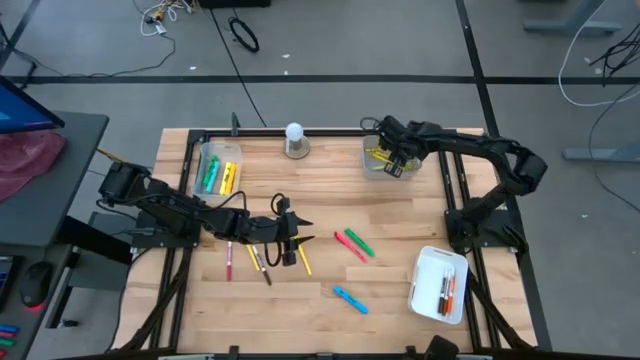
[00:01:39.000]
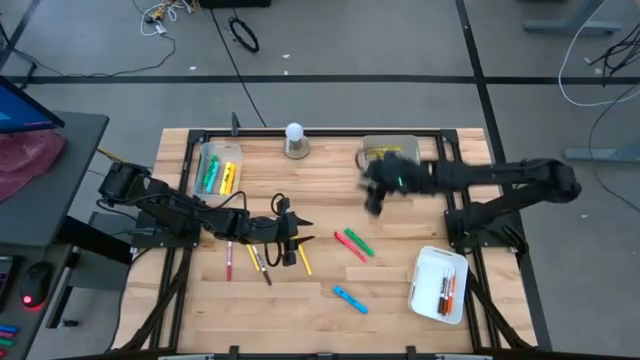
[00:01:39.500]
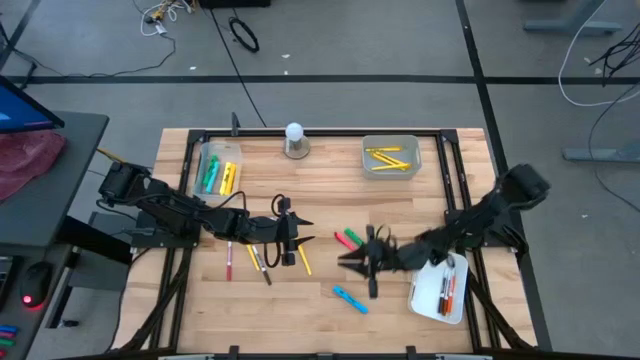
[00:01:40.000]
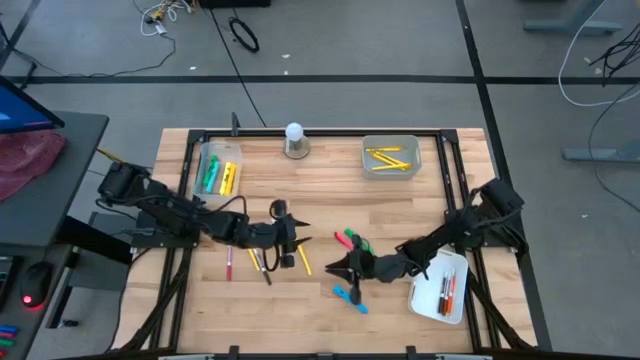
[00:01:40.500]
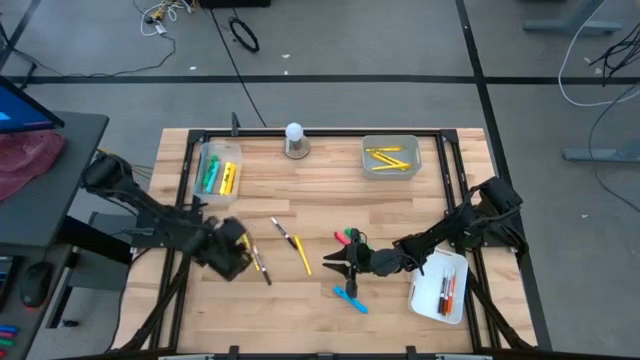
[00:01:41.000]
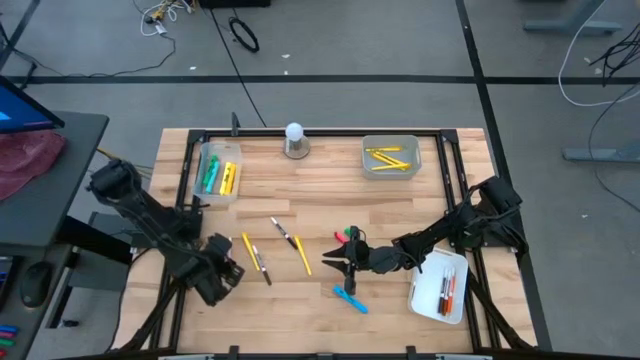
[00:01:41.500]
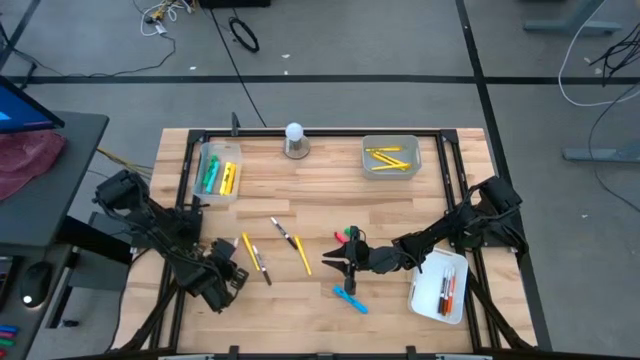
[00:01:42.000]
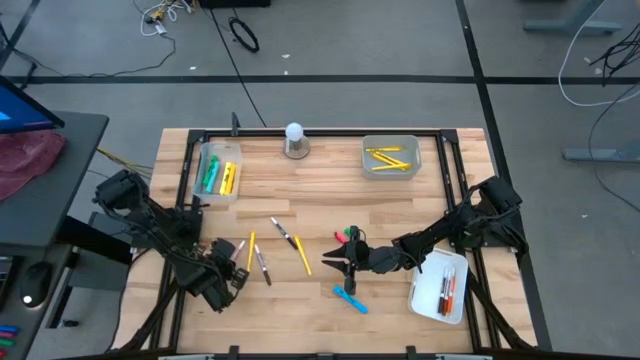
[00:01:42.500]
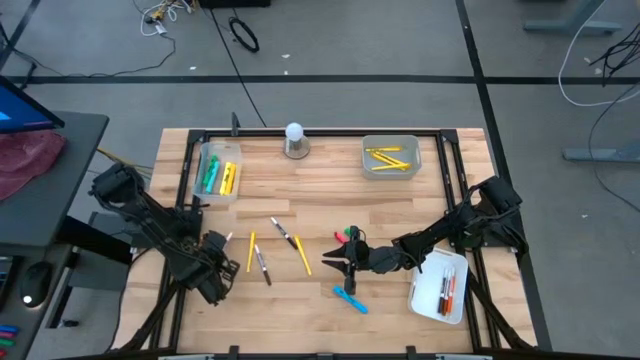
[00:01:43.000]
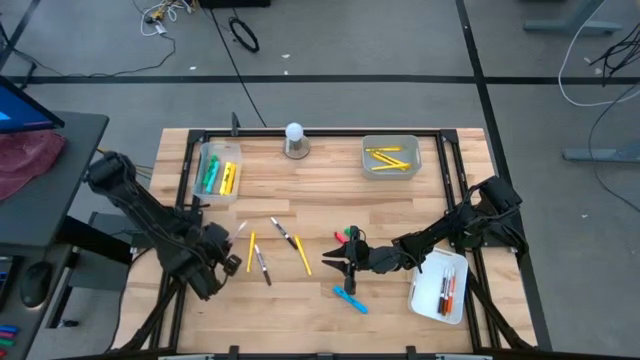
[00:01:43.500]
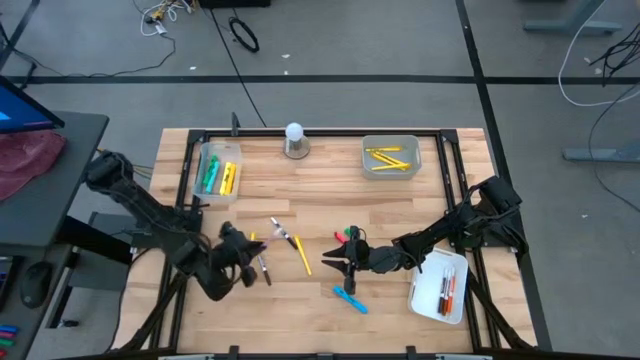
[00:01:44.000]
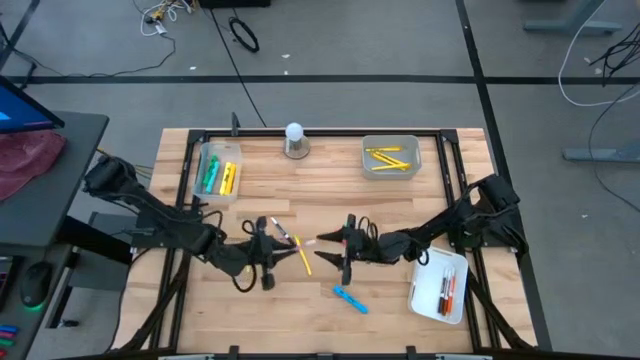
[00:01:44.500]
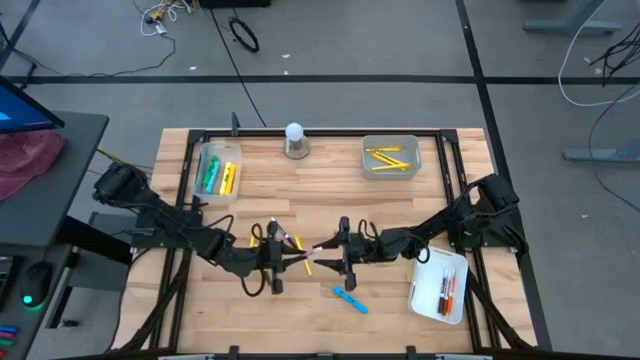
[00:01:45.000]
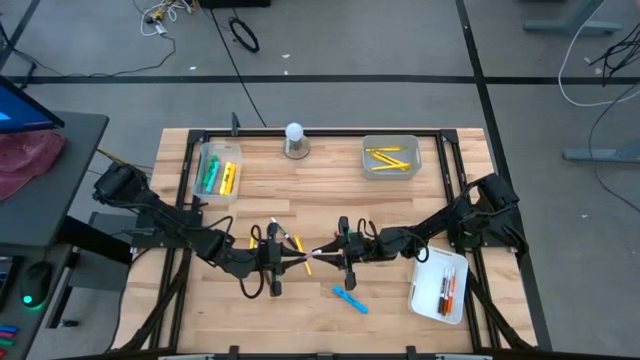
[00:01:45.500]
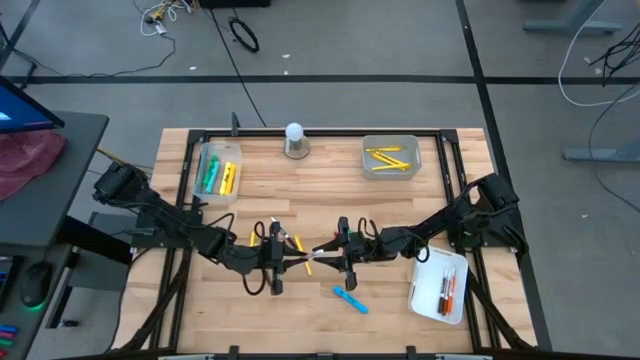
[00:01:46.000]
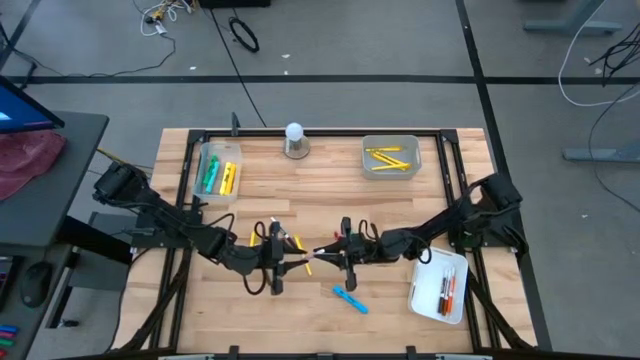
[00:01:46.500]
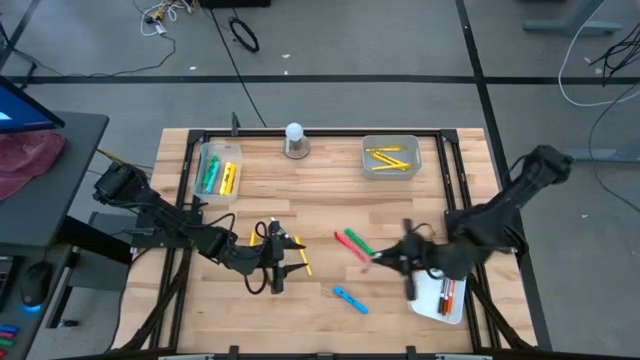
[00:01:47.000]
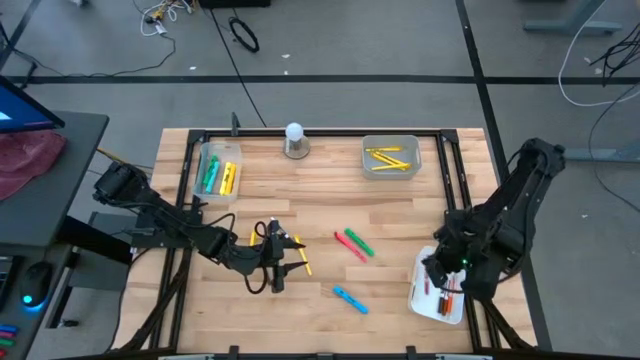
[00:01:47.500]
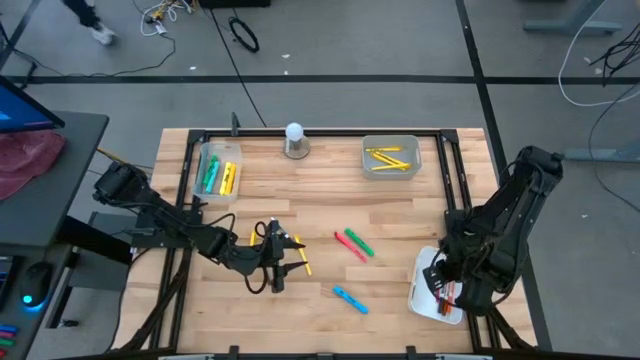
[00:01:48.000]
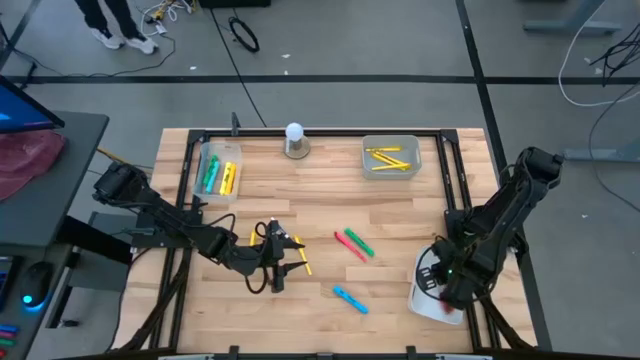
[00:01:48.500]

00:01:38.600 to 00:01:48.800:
Task: Pick & Place Markers
Put the pink marker into the white bin

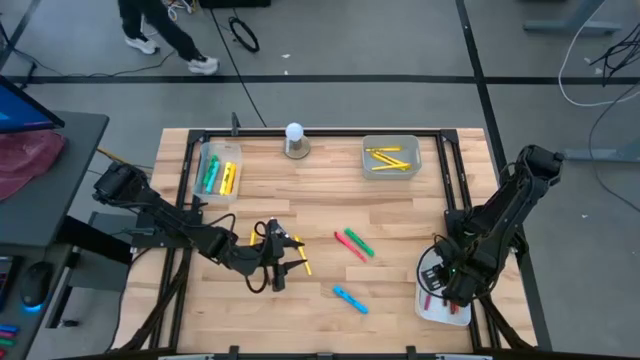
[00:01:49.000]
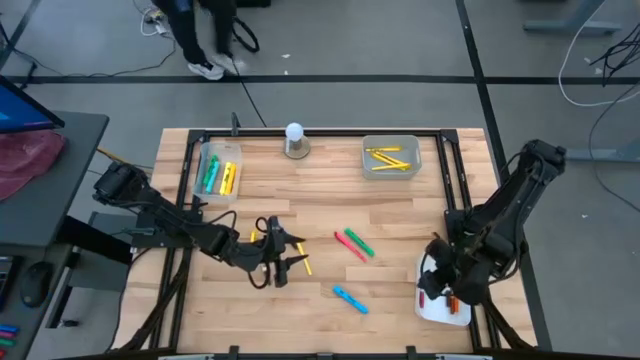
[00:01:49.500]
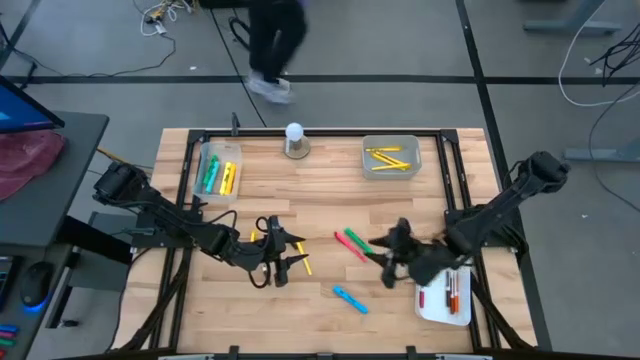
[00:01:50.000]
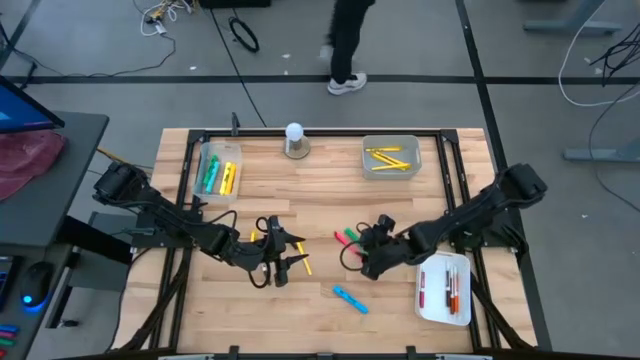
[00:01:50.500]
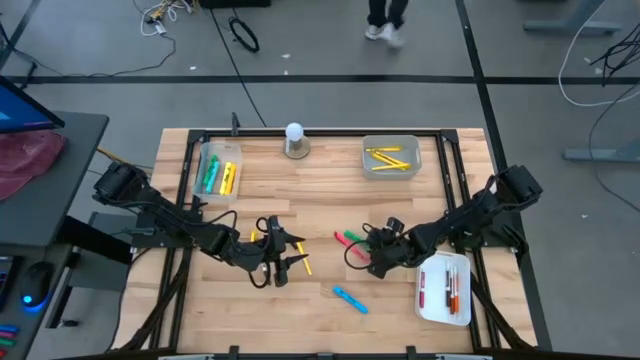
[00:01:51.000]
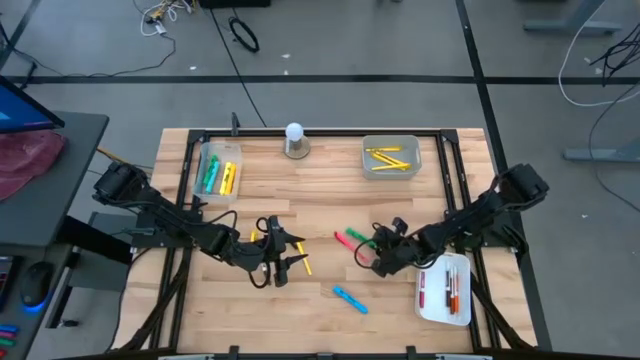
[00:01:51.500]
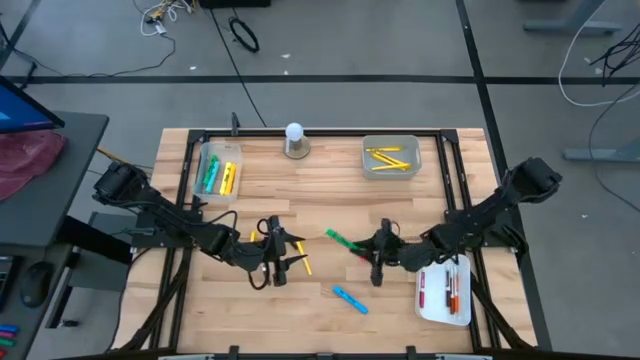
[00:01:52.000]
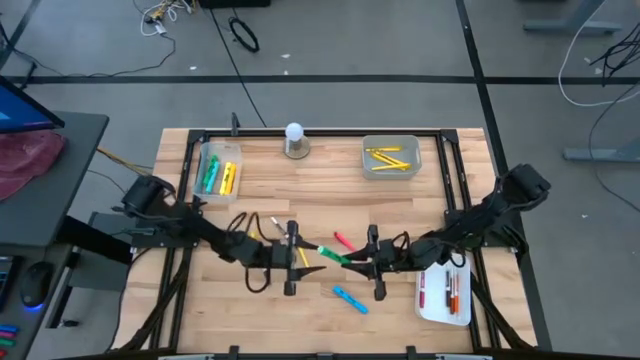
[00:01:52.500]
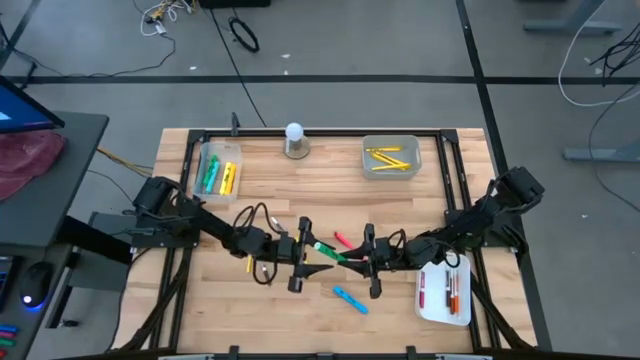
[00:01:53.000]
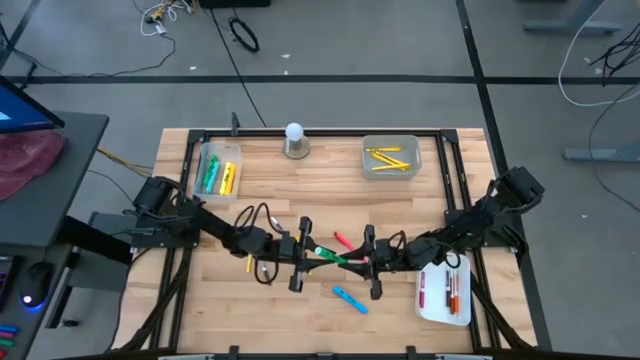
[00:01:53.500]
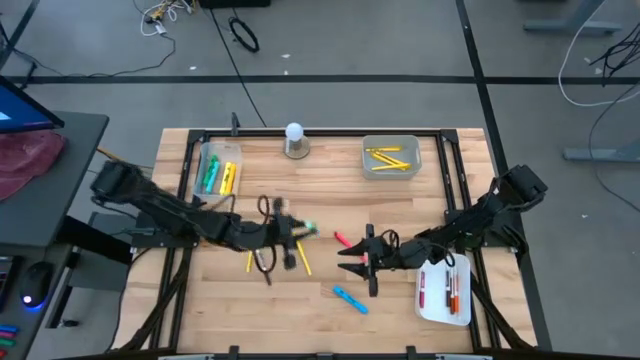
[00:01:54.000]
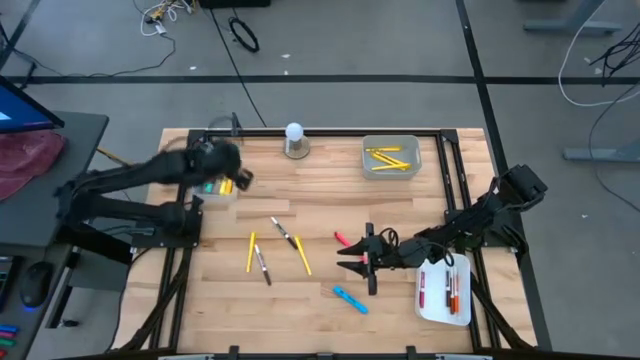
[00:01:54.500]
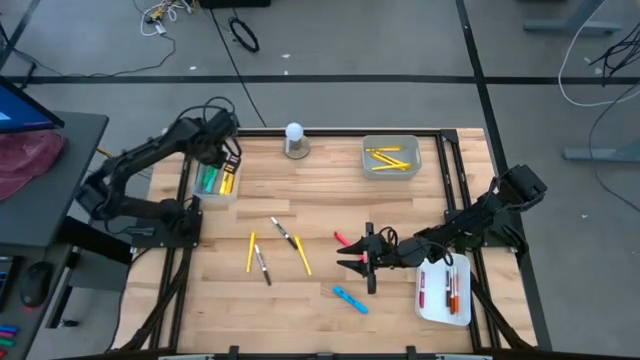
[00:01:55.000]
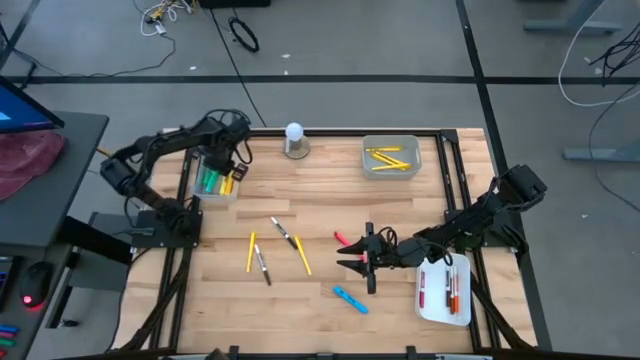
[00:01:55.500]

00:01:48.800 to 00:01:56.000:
Put the green highlighter into the transparent bin

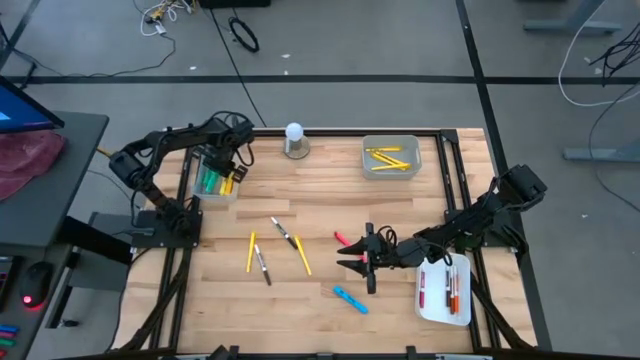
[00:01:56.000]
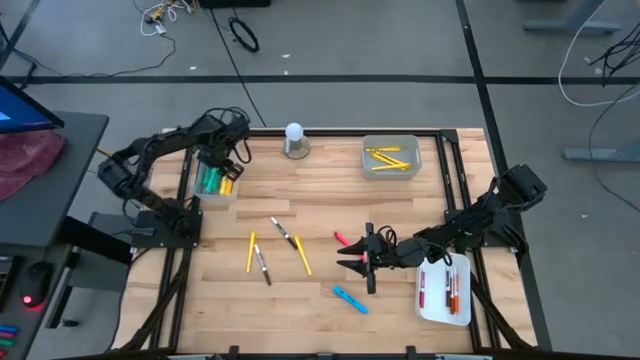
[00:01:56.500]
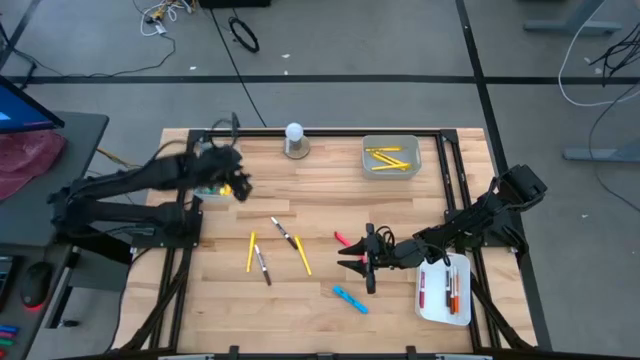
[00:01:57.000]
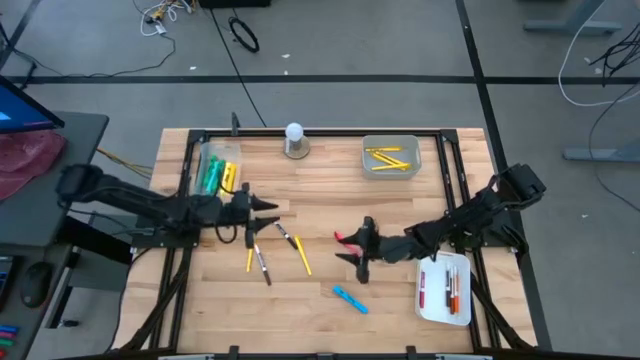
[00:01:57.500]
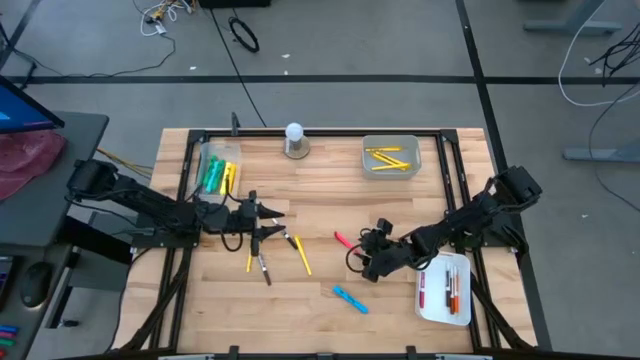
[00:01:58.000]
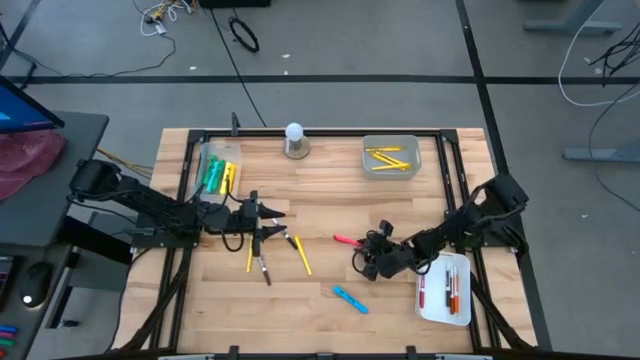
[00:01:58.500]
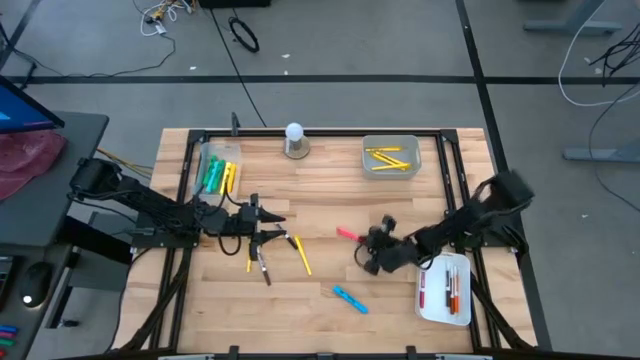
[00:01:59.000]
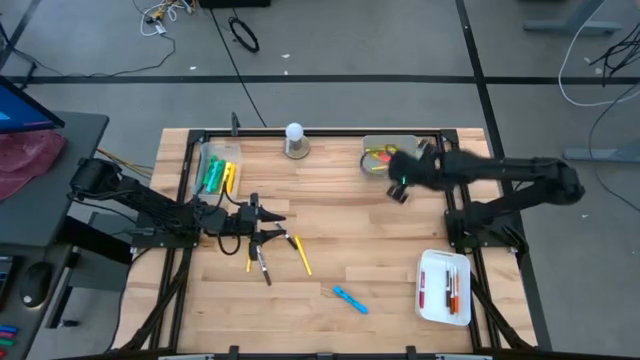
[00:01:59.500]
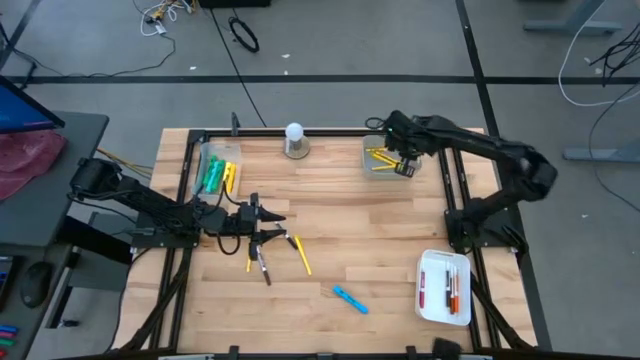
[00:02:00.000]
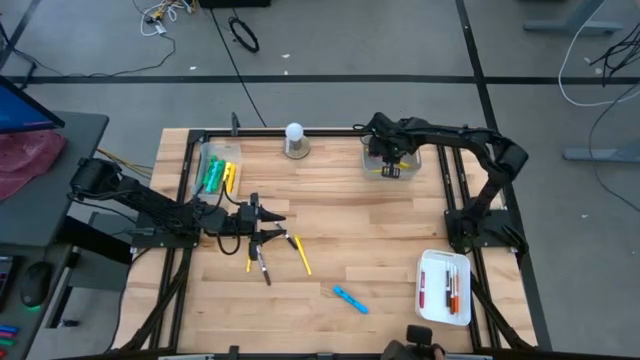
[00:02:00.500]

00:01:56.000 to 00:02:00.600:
Put the pink pen into the gray bin
